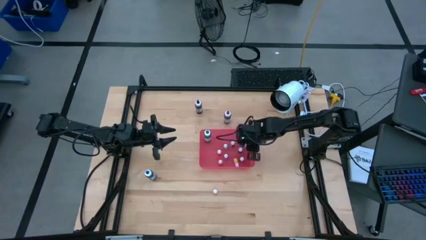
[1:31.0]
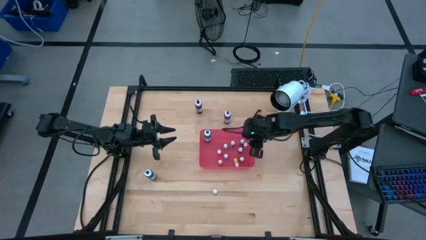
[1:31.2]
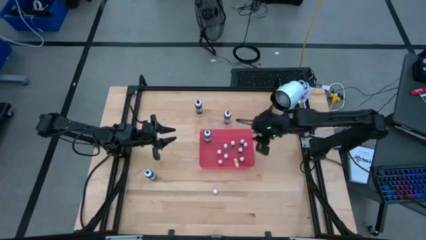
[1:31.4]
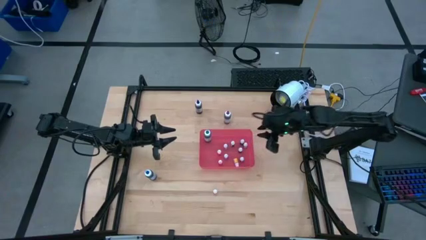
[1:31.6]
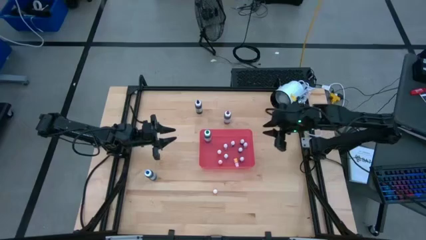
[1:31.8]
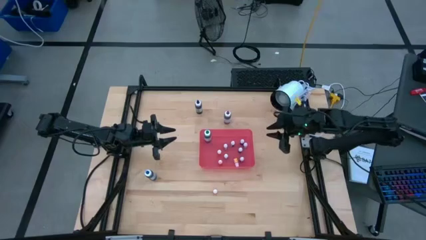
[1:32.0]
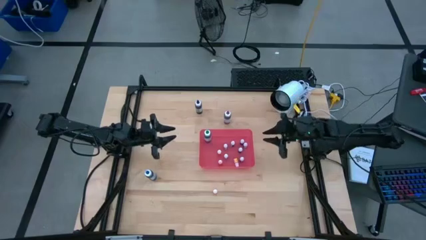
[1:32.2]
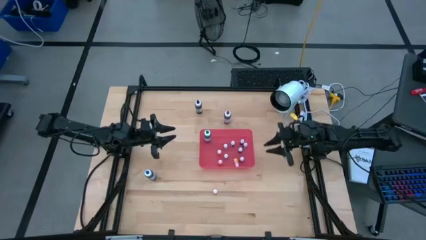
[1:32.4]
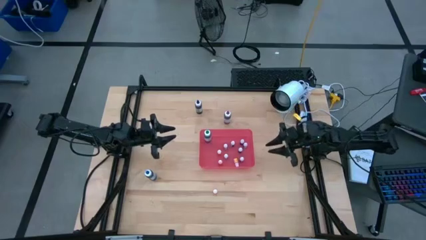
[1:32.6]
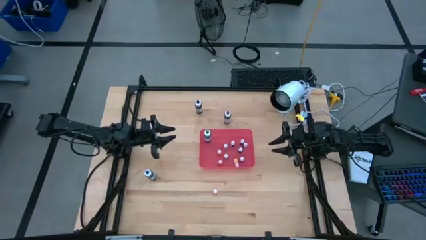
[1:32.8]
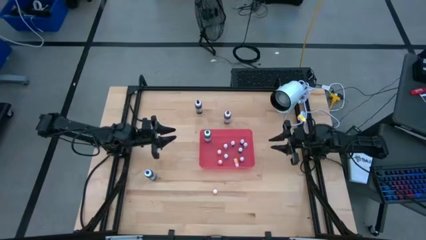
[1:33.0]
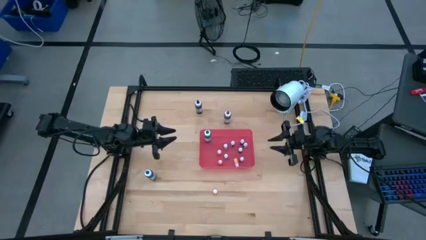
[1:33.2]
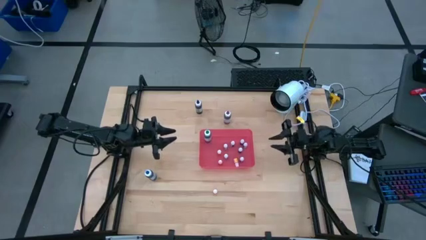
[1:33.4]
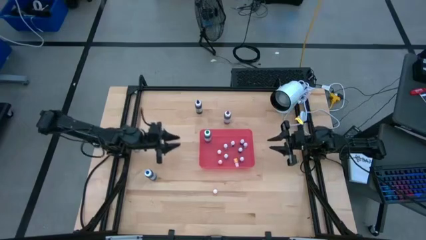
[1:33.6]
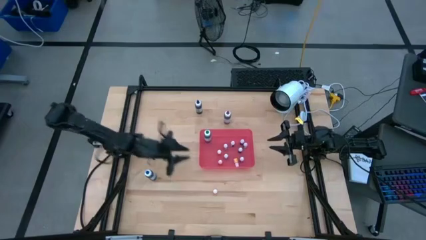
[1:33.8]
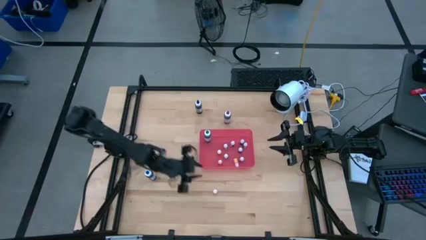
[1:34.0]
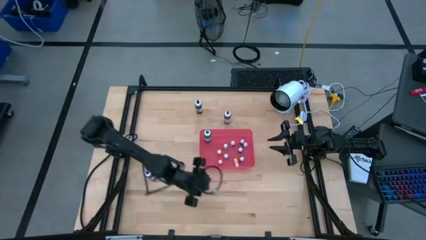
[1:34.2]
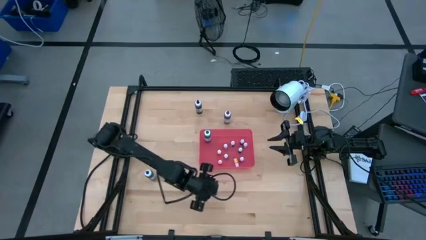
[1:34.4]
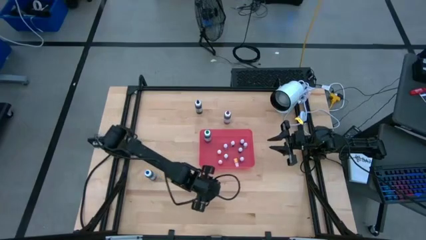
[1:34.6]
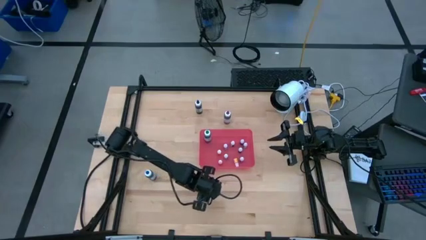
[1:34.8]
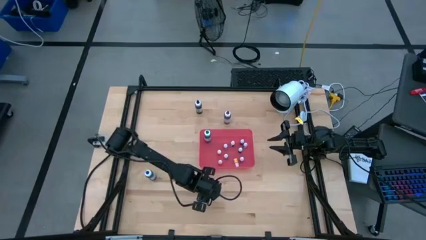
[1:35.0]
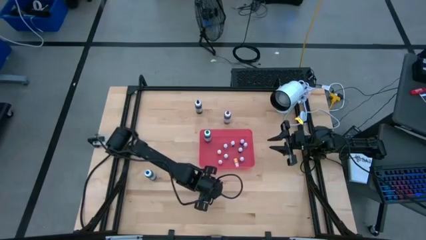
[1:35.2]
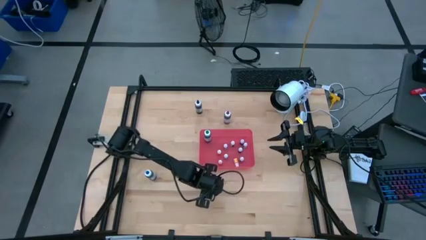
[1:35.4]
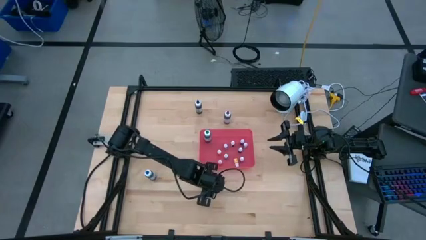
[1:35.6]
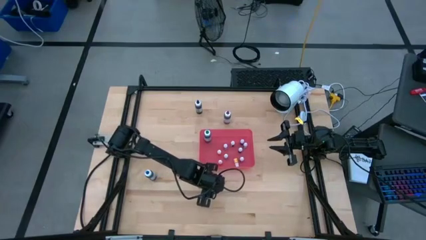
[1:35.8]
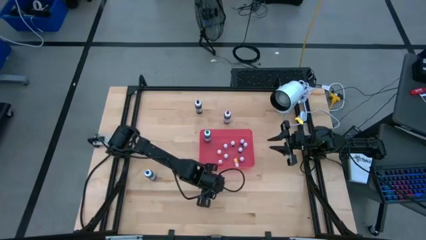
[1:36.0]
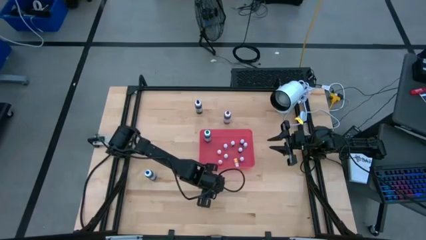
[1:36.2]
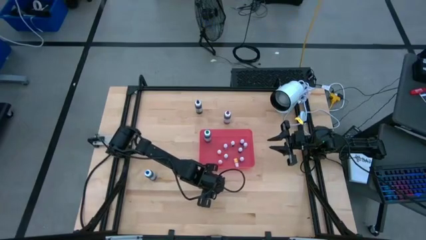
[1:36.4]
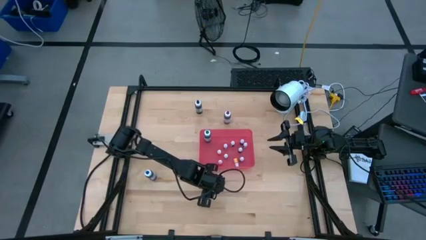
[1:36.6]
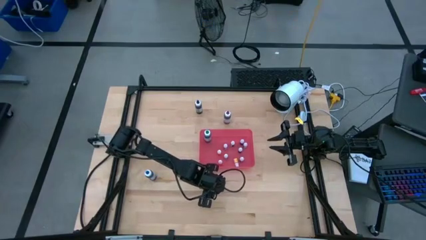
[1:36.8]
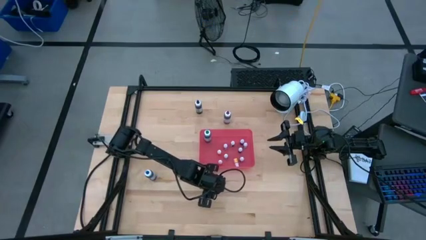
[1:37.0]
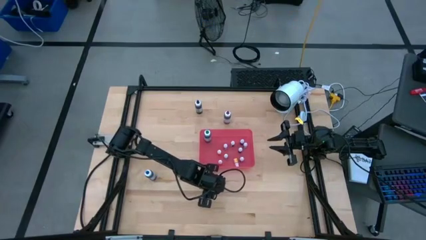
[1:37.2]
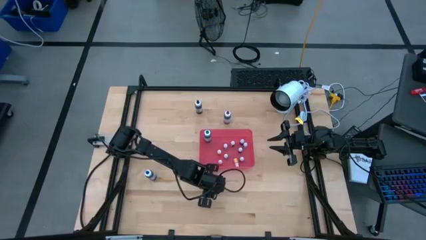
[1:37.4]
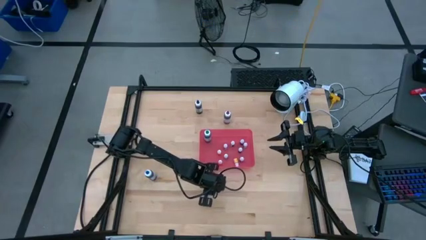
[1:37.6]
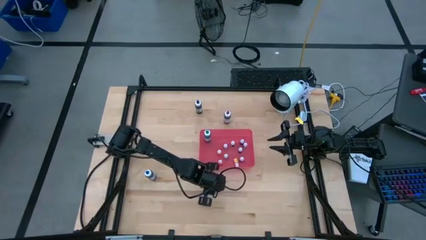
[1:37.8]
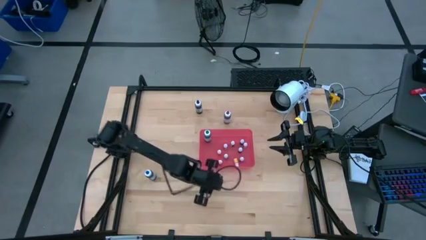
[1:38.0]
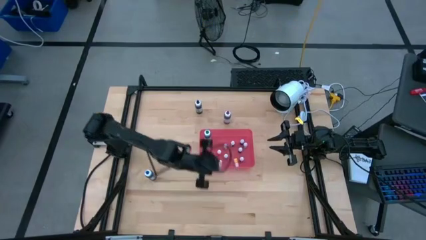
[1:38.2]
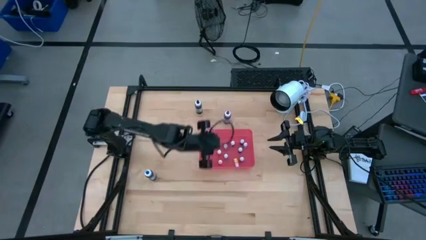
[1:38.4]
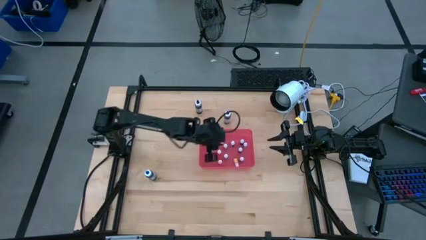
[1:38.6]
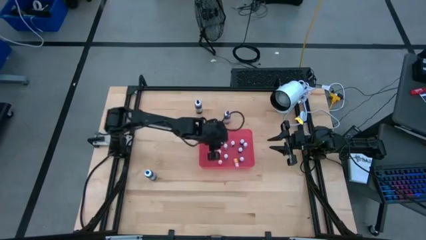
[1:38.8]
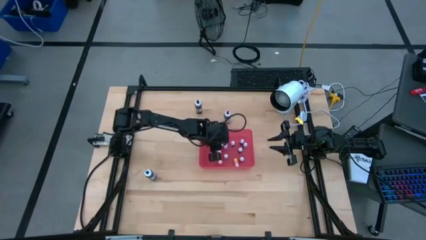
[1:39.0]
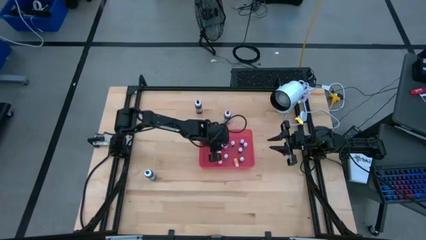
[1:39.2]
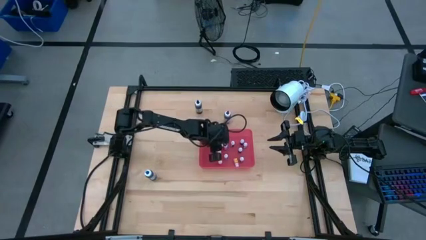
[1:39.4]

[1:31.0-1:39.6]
Task: Pick & Place food coloring
Put the small yellow food coloring bottle into the red bin

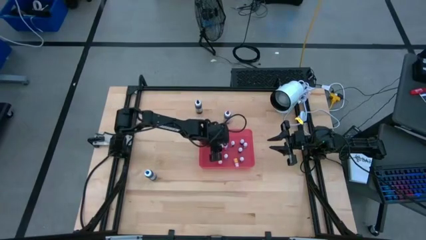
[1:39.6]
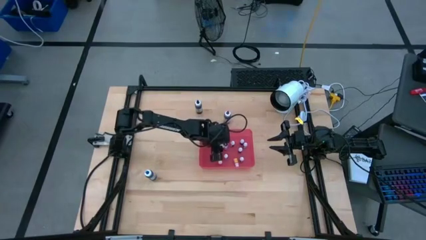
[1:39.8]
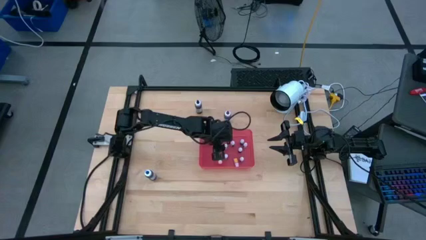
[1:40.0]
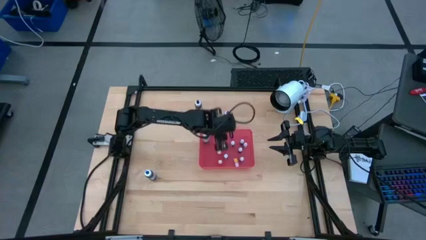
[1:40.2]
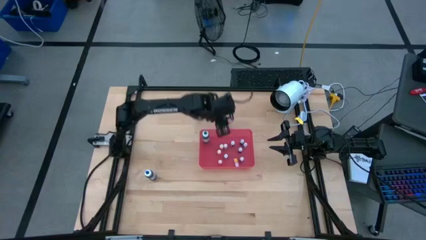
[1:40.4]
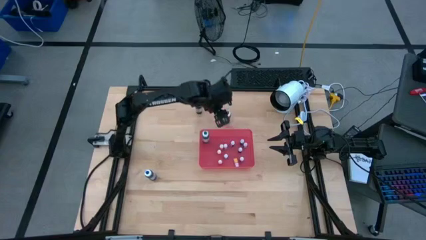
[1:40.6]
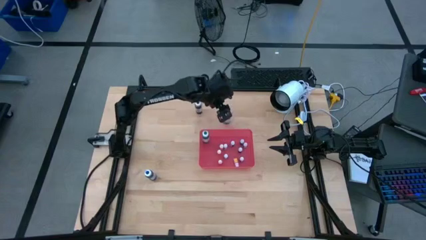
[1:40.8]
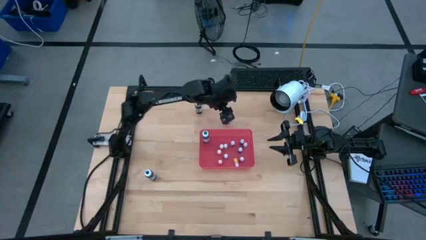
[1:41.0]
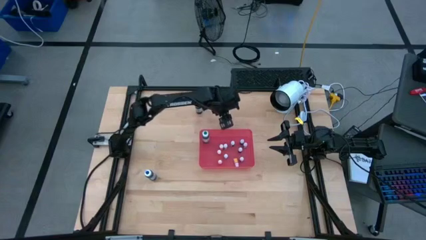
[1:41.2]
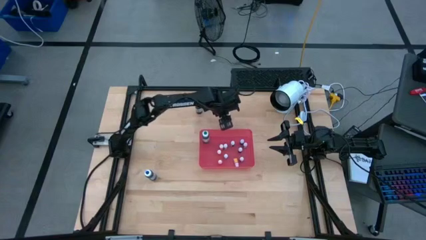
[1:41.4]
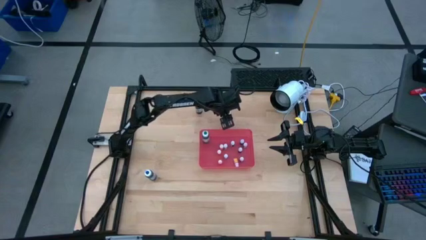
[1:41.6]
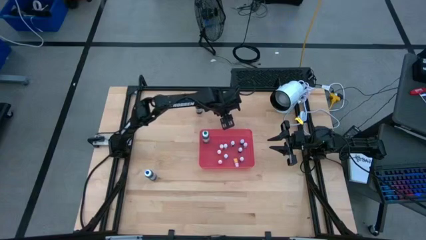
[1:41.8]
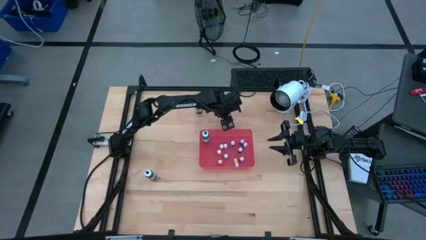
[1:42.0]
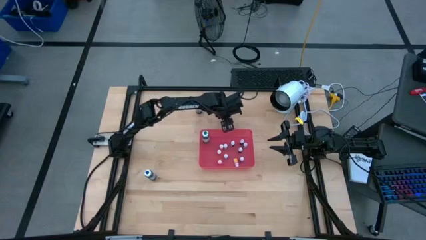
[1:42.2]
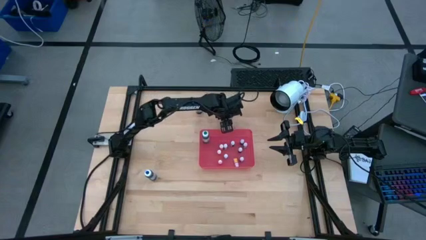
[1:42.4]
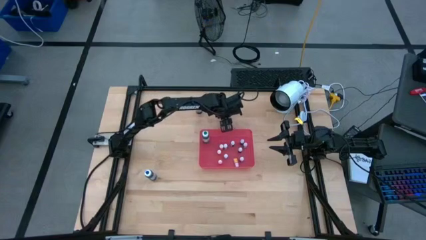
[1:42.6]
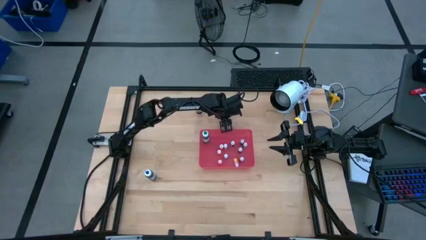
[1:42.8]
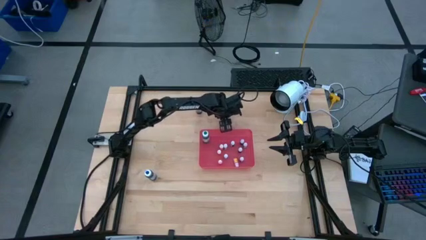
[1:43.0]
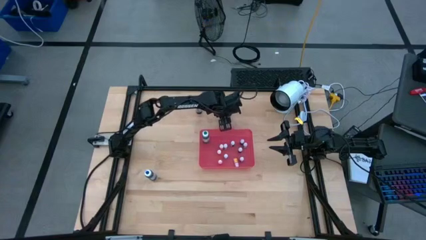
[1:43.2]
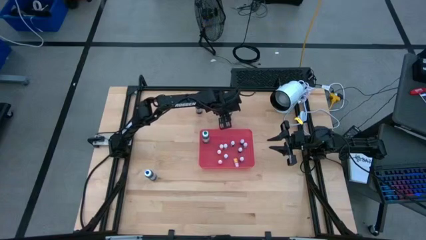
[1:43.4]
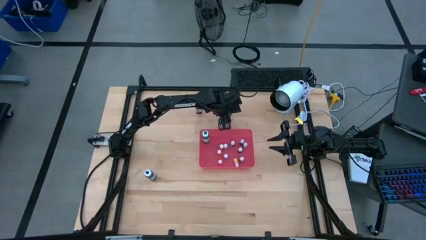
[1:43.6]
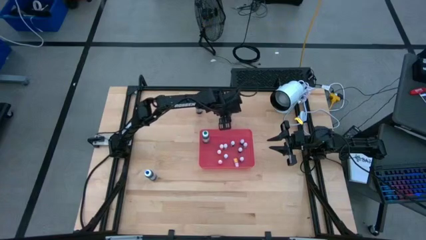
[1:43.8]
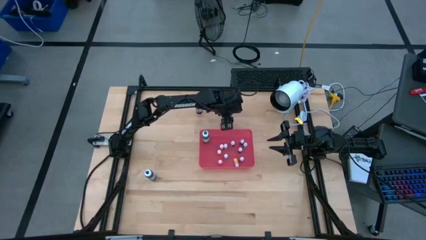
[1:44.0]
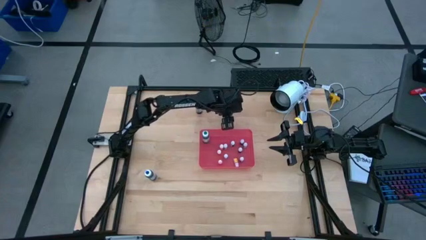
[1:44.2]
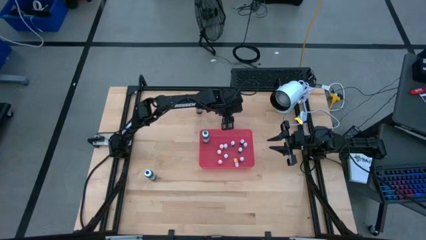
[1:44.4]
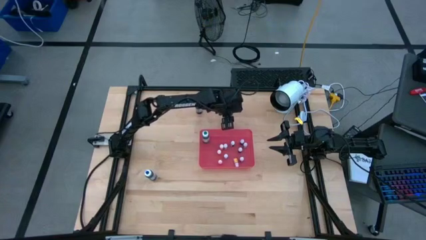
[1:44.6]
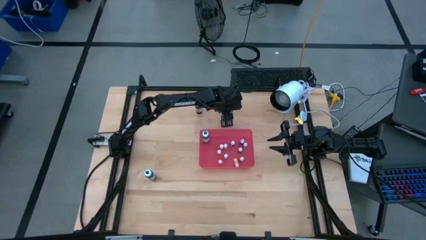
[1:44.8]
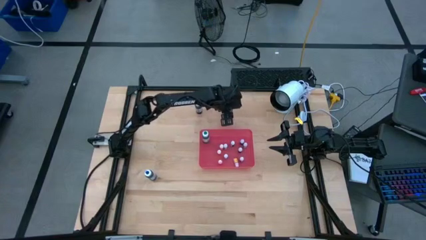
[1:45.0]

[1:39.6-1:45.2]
Put the big purple food coloring bottle into the red bin

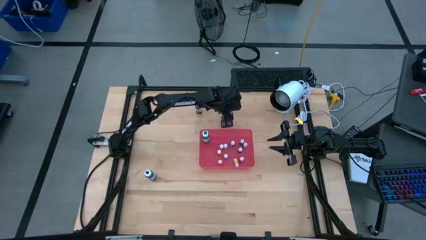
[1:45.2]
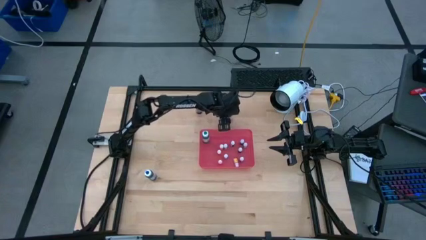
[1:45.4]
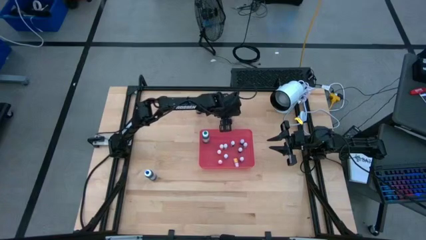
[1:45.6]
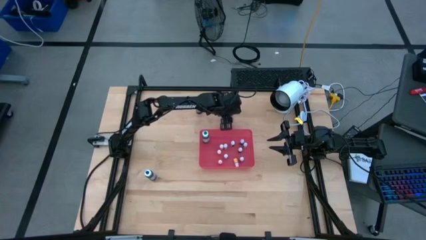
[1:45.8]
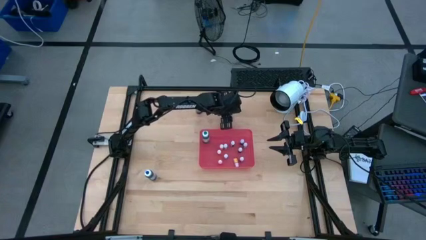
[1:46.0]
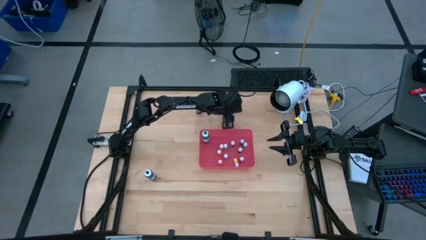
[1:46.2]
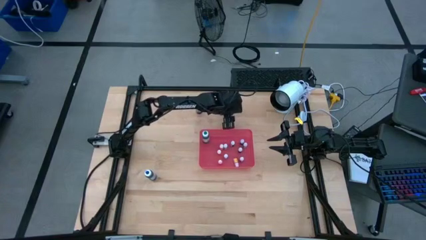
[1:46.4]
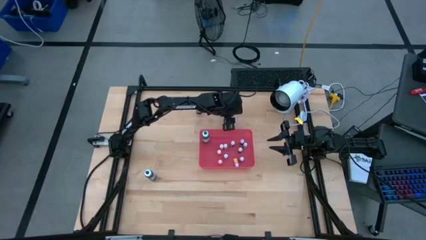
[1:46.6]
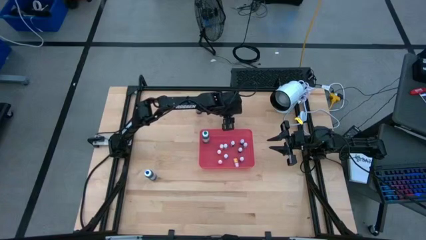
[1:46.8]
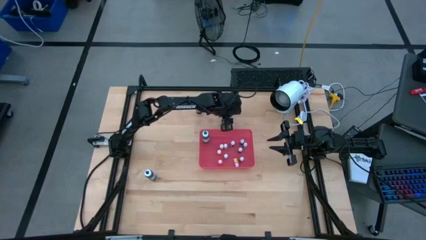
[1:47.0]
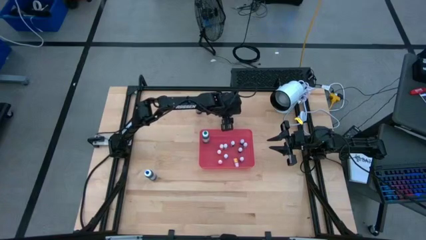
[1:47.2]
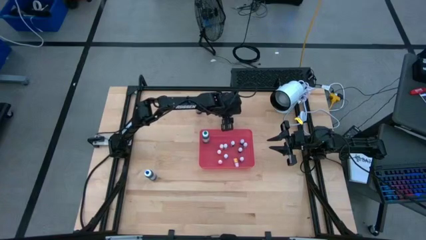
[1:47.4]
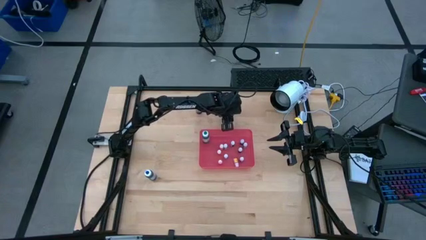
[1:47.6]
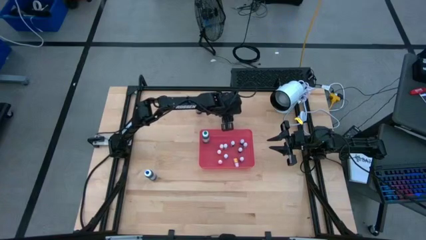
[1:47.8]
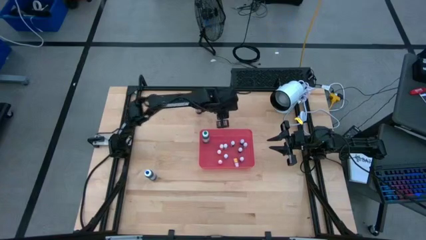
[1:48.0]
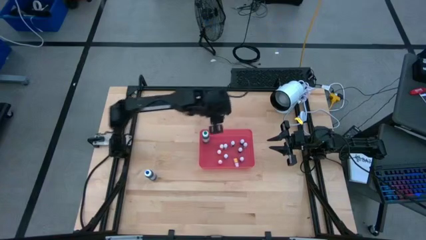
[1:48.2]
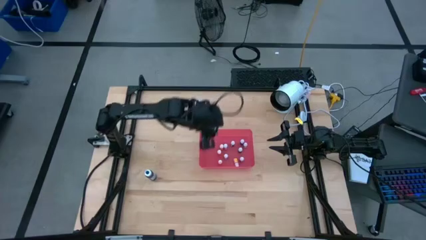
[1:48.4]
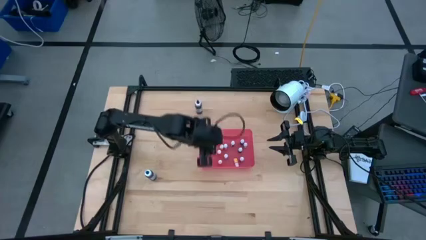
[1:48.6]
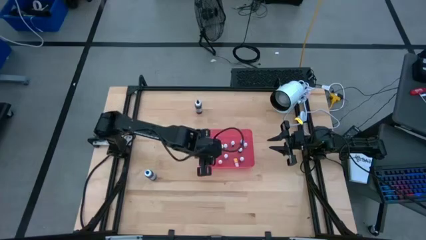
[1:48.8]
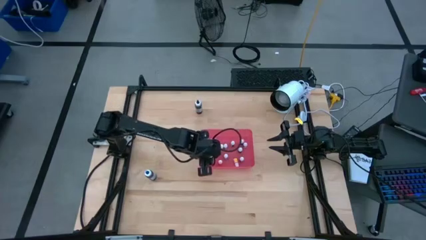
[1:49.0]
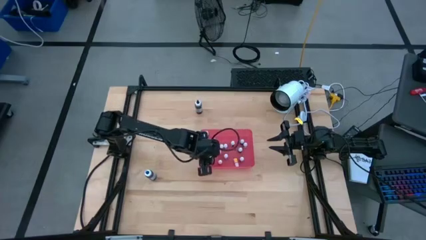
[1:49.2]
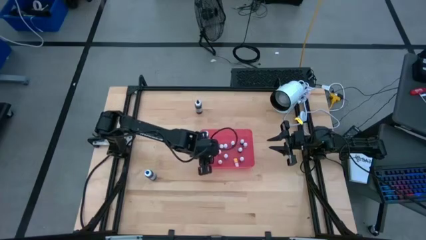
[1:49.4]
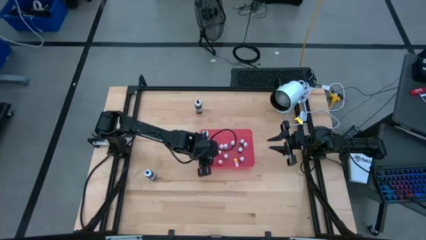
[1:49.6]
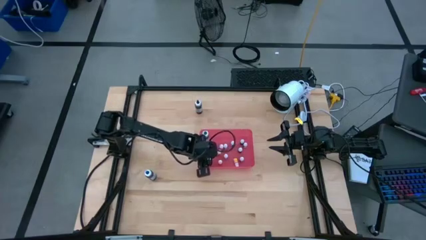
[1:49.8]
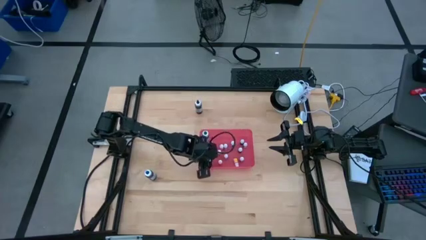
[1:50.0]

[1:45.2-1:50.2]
Put the big purple food coloring bottle into the red bin
